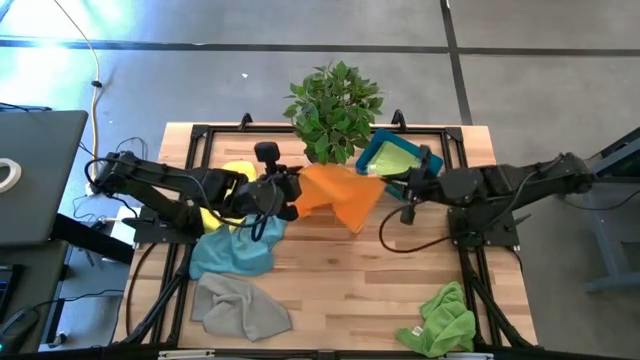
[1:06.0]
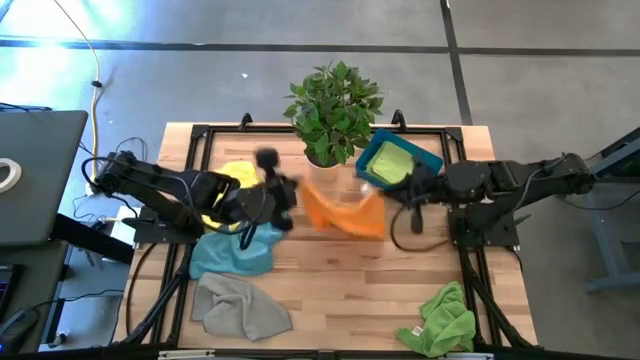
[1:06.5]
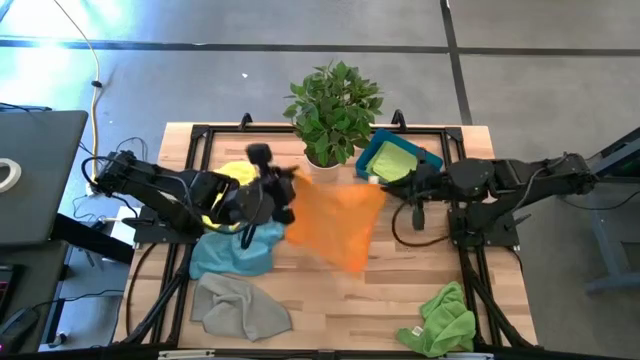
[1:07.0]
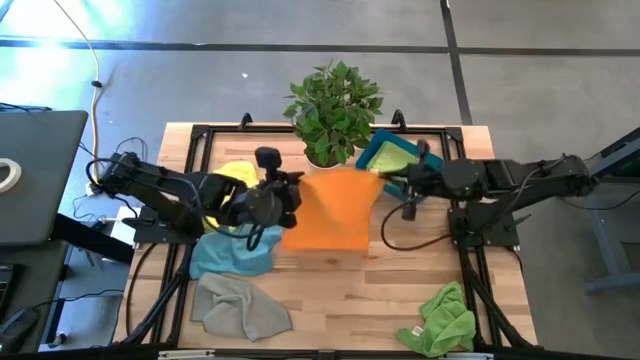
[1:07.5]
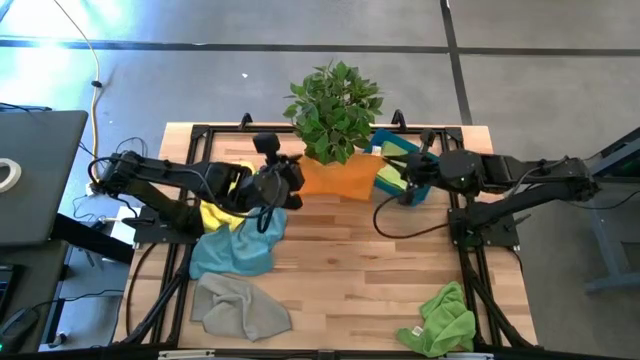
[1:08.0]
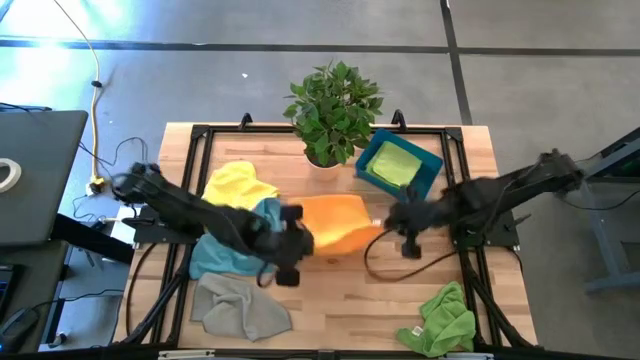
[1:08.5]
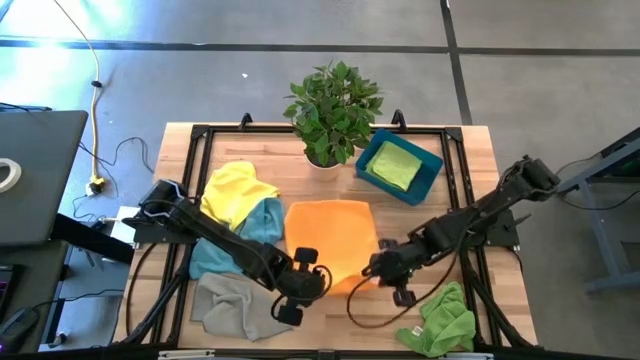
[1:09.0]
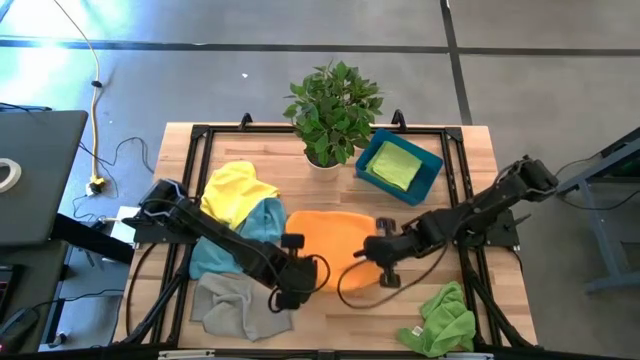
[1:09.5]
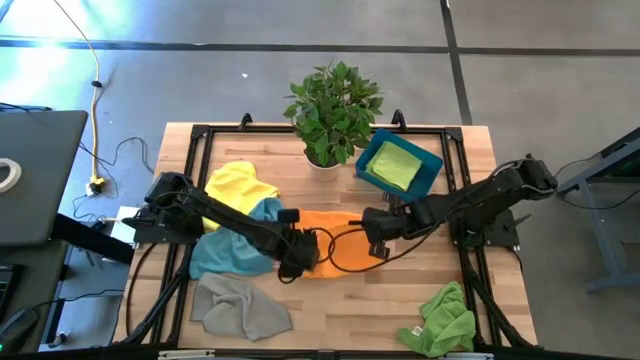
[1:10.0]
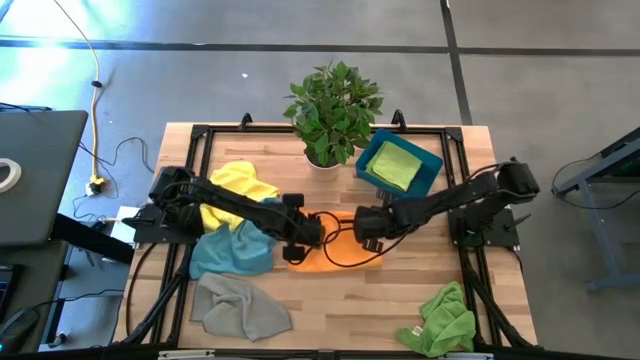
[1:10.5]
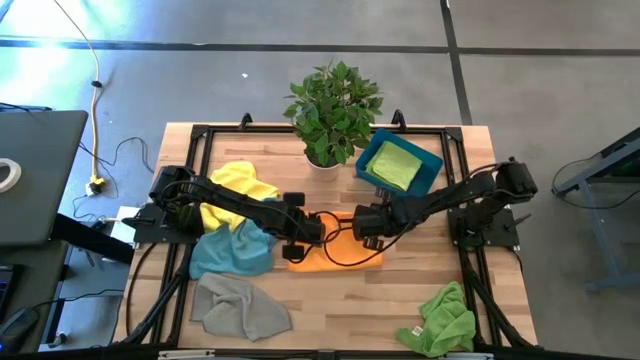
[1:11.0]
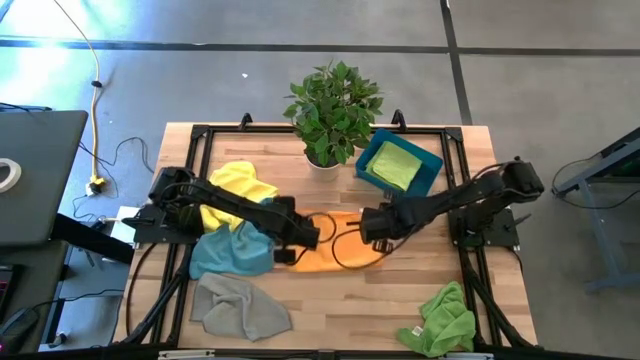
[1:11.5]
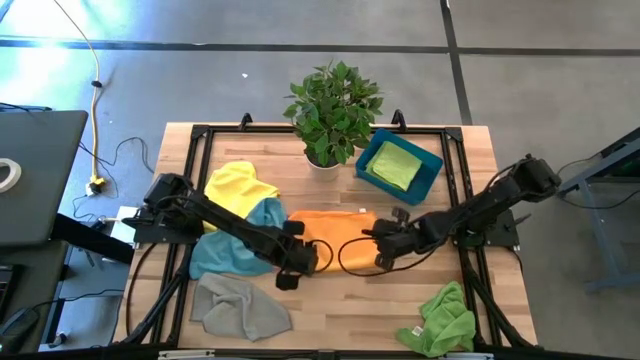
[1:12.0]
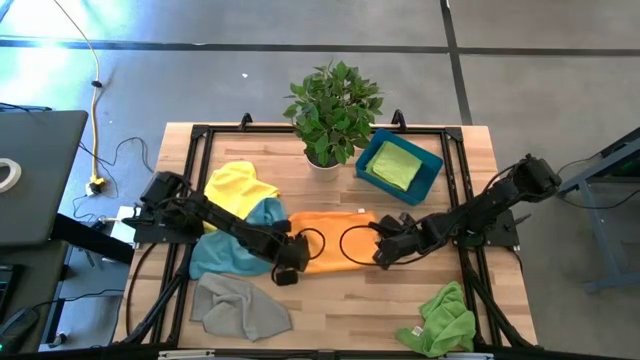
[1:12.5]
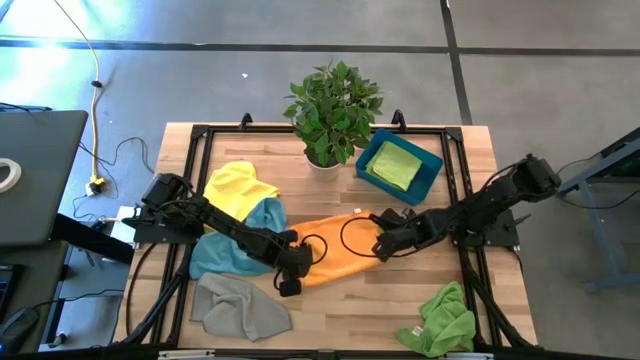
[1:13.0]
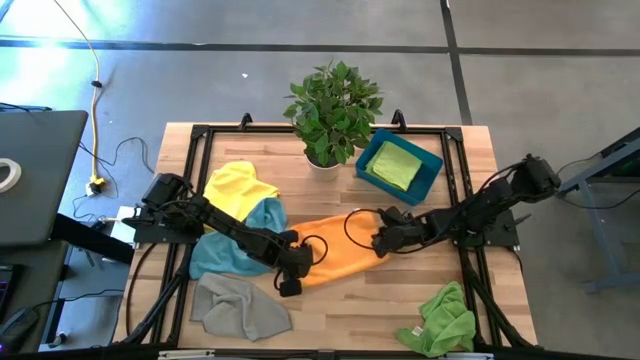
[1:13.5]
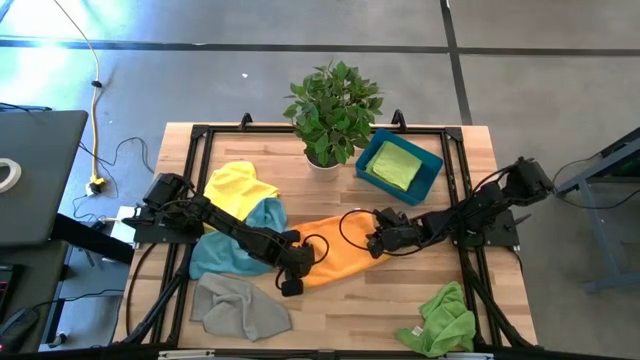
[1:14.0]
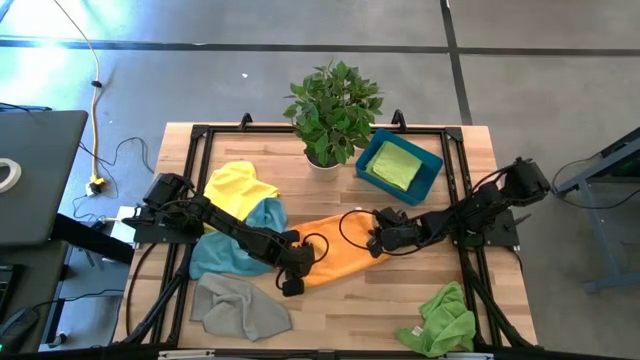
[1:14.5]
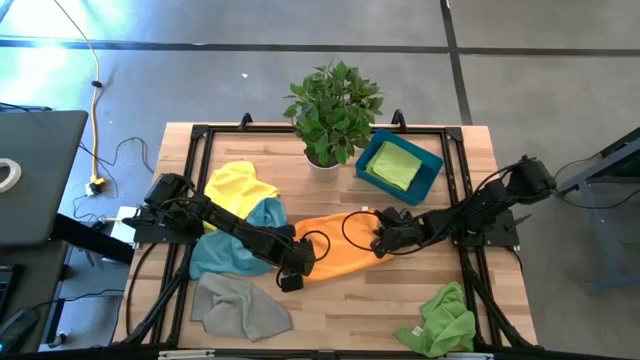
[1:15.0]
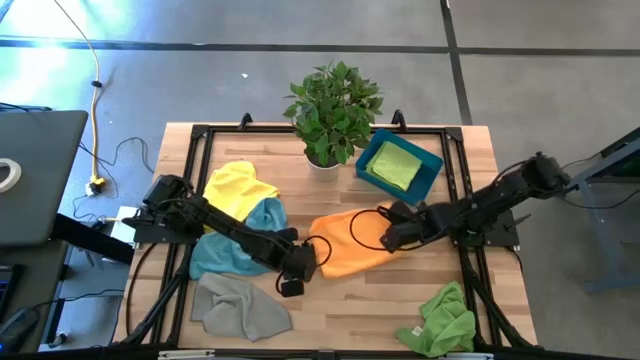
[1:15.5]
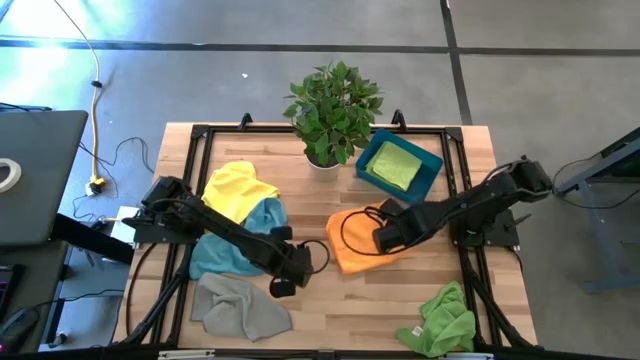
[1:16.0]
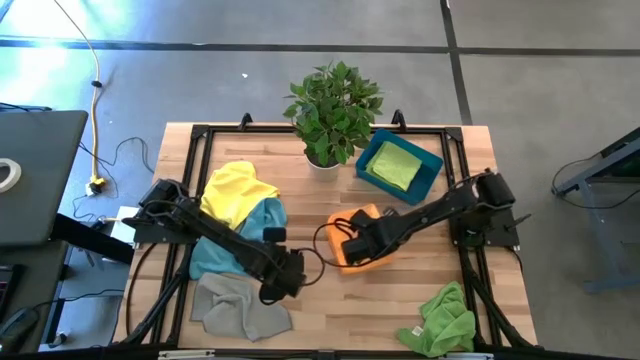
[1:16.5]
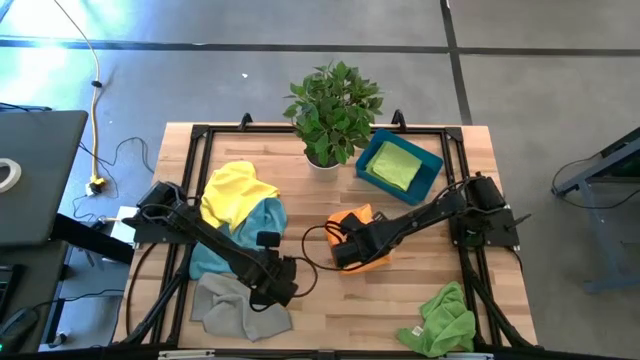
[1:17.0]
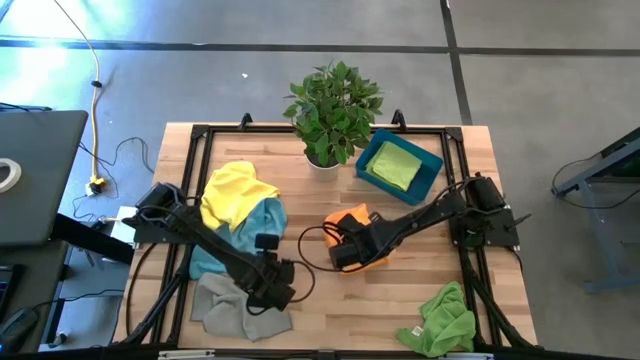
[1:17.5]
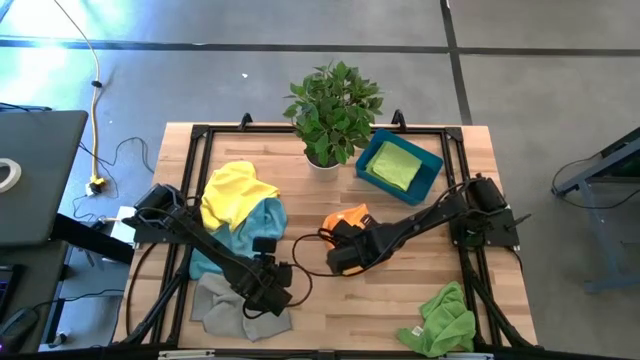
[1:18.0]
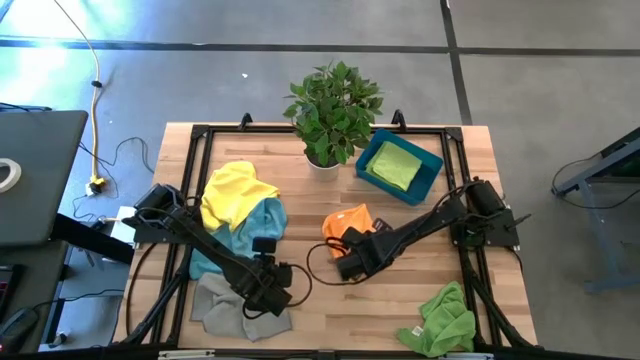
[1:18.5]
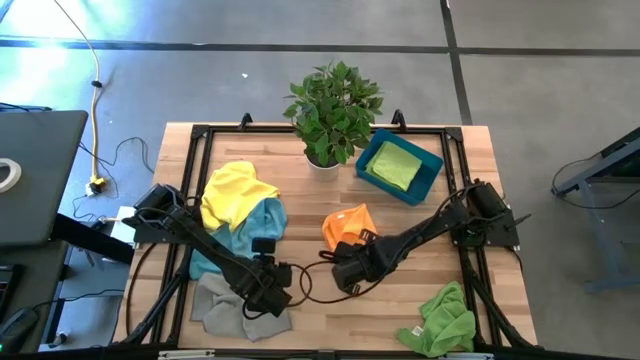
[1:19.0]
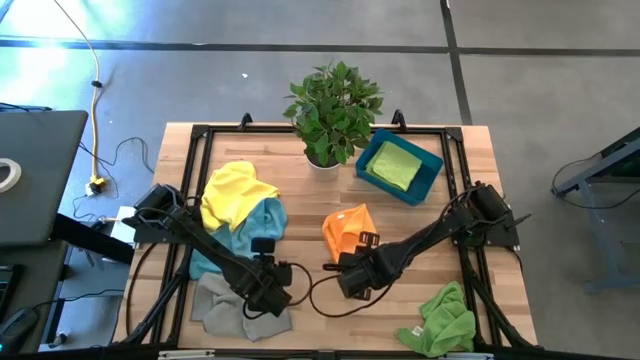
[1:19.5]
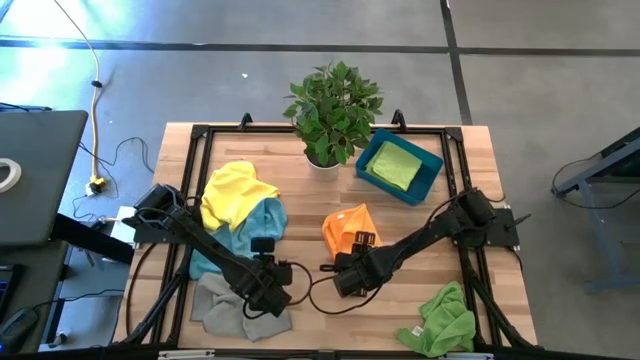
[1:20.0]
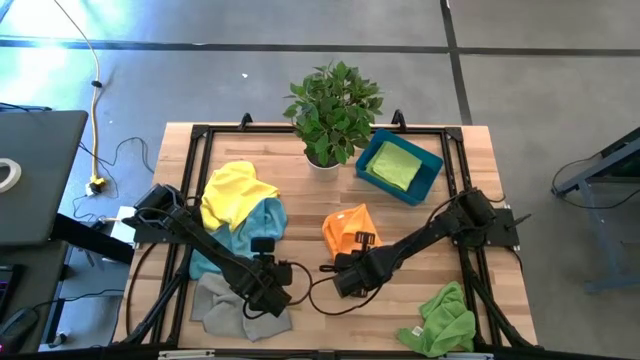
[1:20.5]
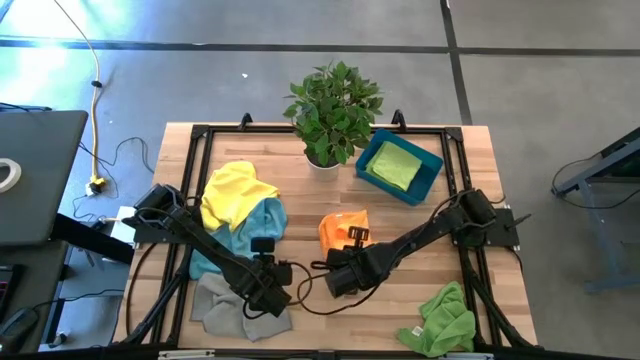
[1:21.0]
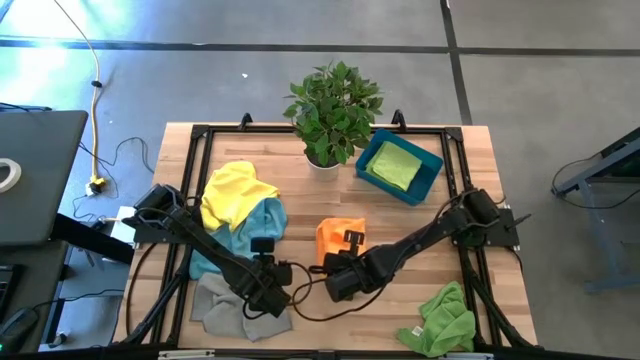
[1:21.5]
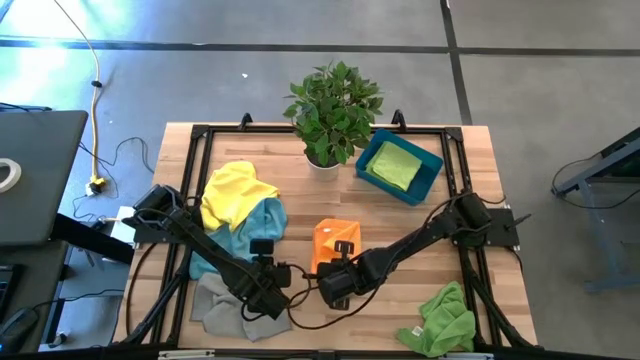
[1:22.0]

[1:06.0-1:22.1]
Task: Fold microfiber towels
Fold the orange towel

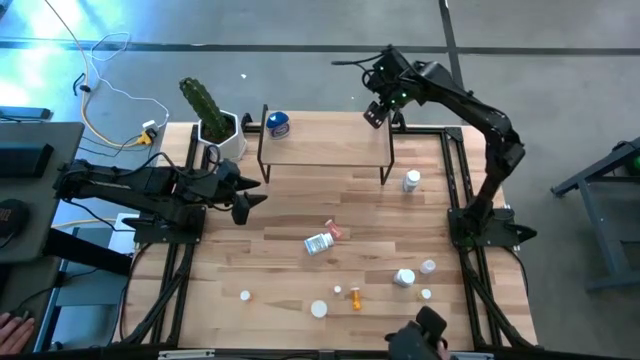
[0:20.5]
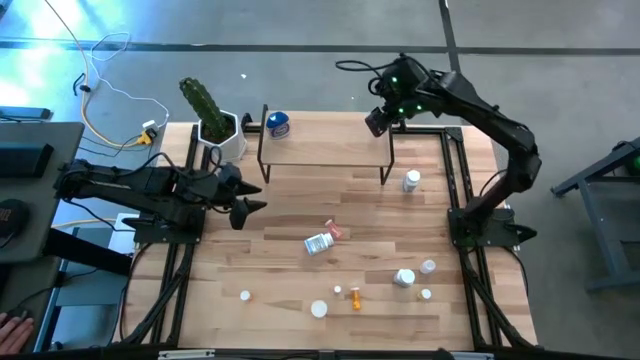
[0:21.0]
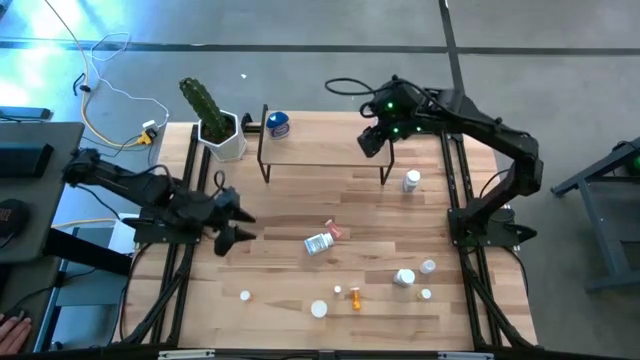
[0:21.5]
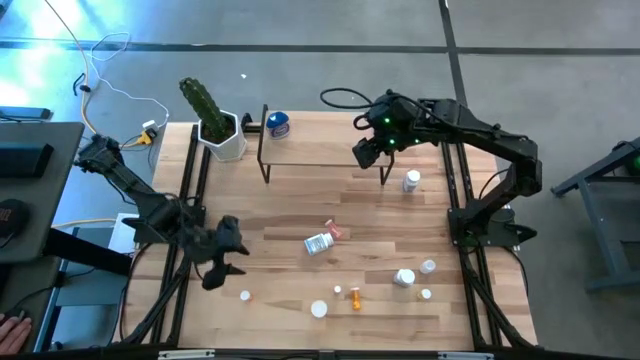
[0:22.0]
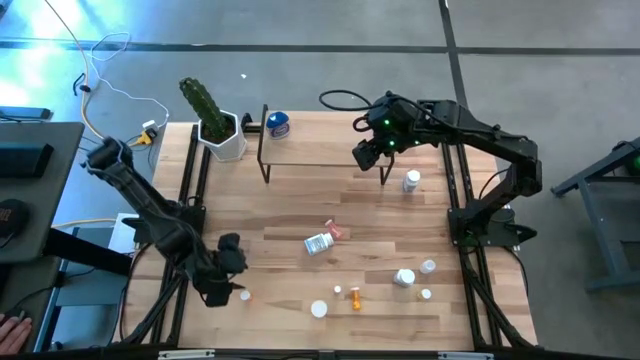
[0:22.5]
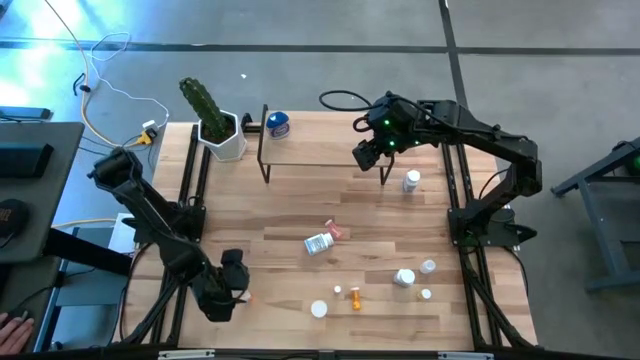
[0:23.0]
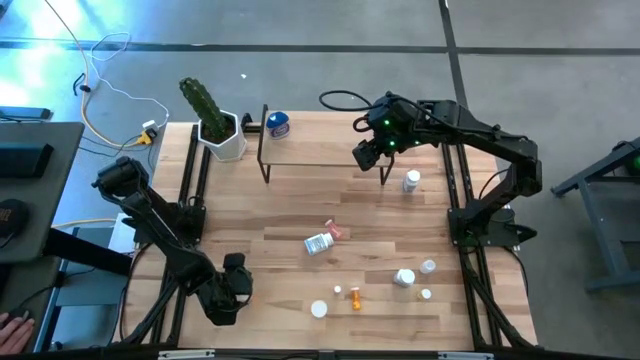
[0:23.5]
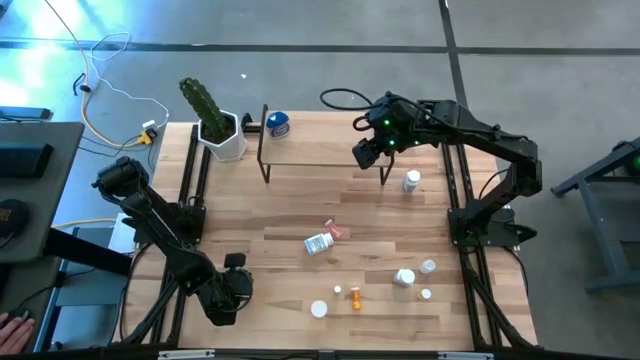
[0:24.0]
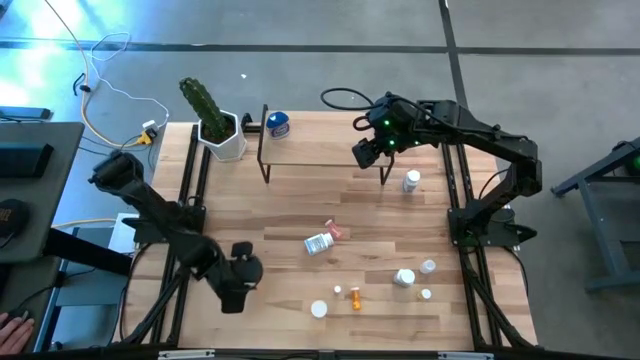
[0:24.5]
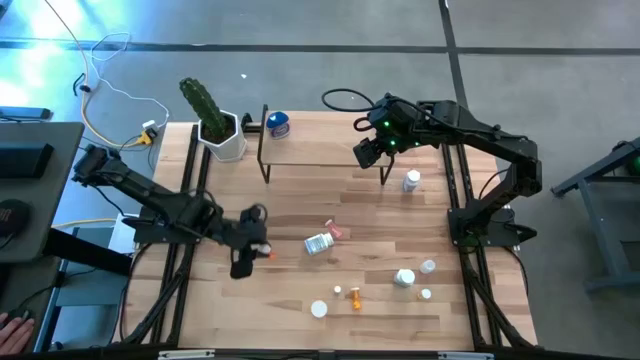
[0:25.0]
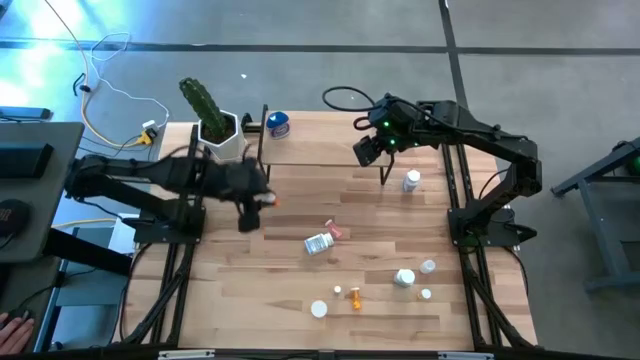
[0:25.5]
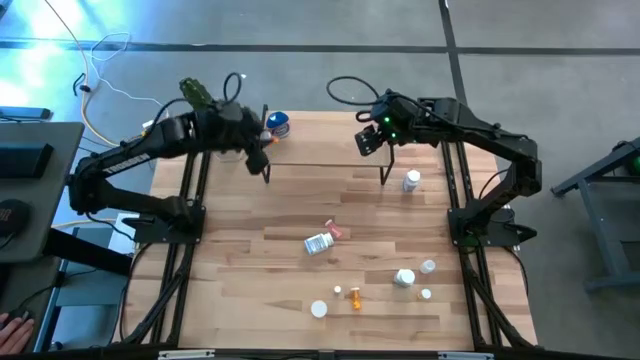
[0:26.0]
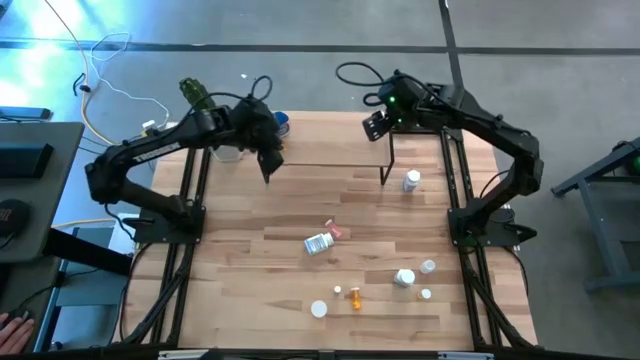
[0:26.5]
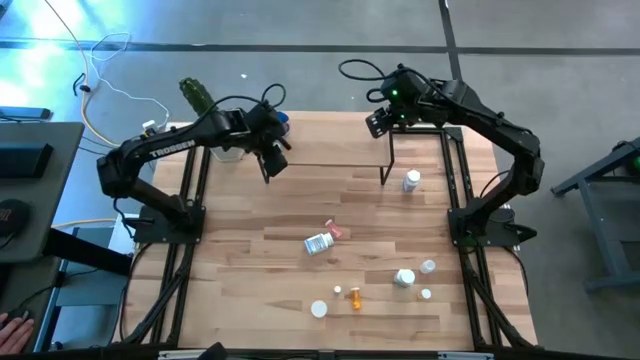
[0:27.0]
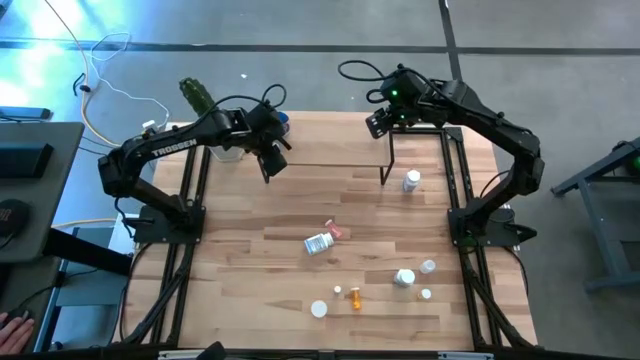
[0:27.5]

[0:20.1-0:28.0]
Task: Pick and place medicine bottles onto shelf by color
Put the left orange pill bottle on the shelf
